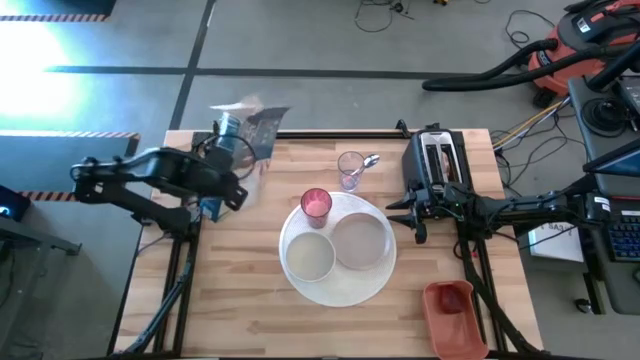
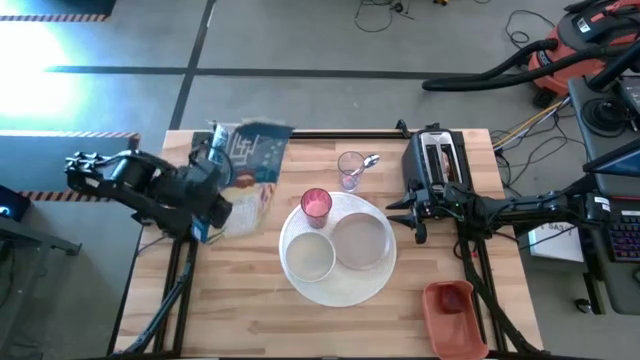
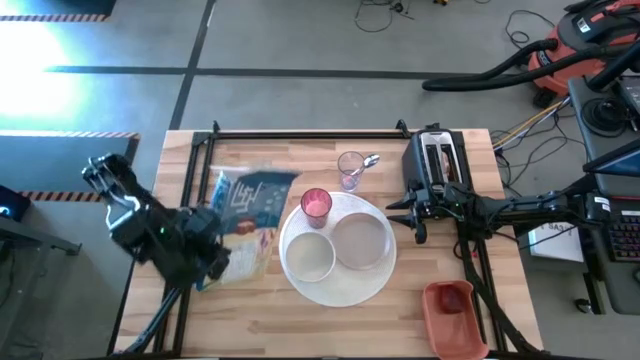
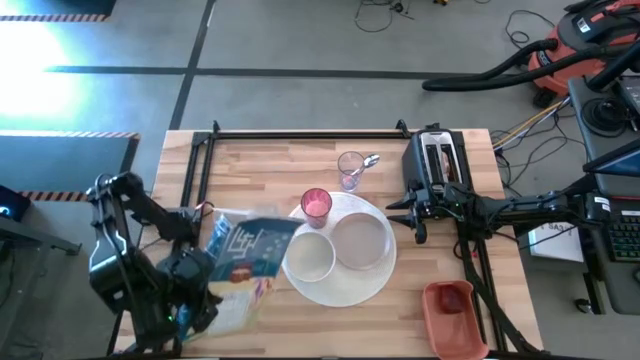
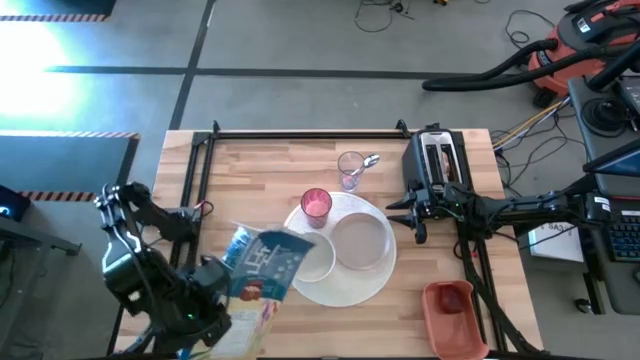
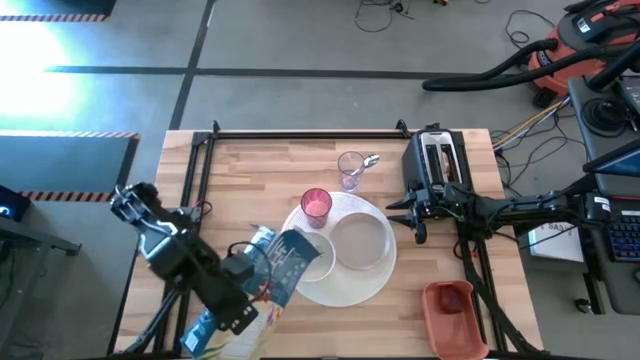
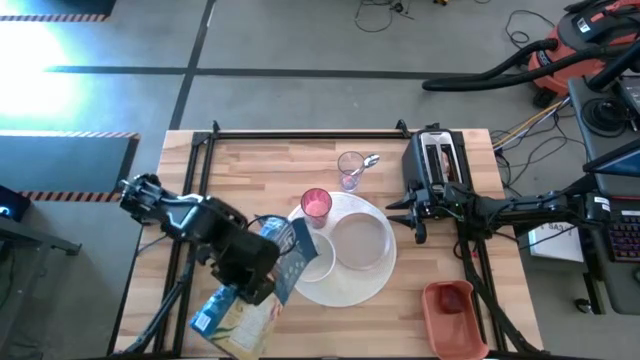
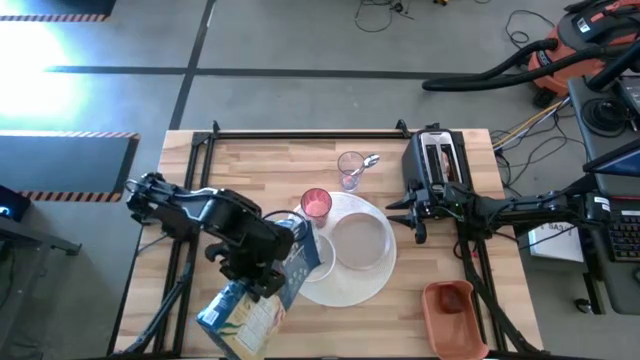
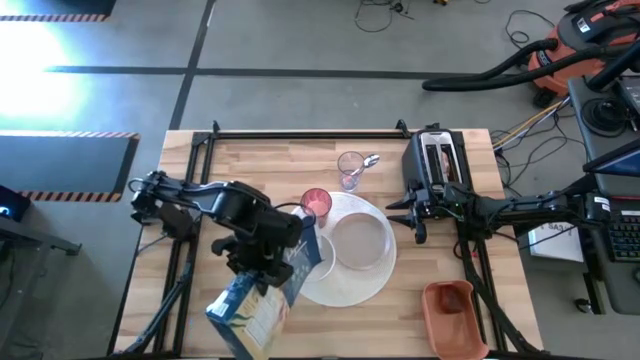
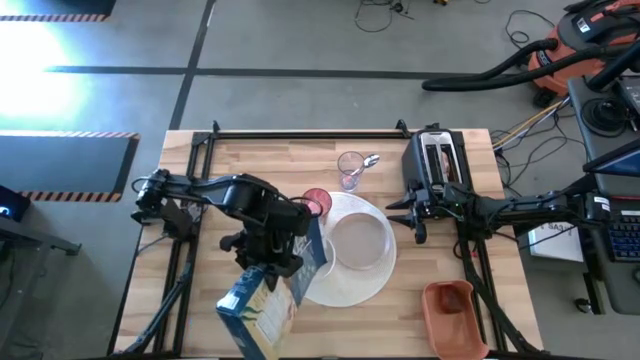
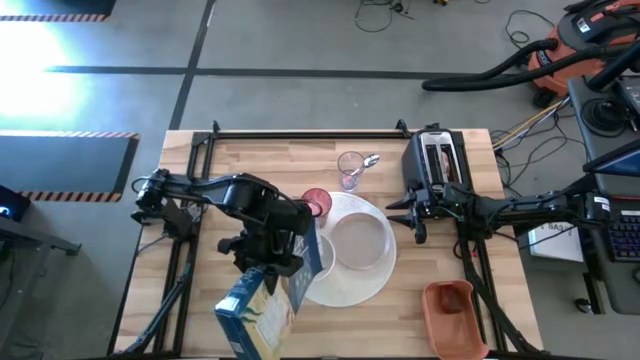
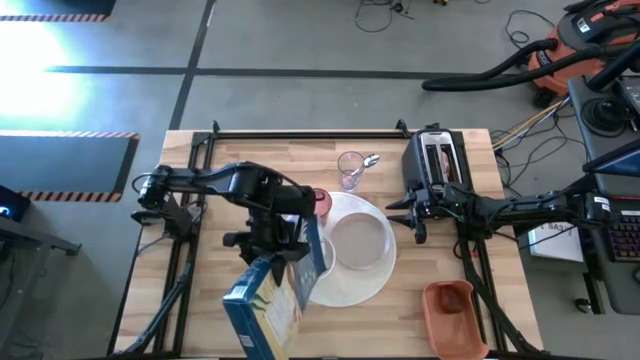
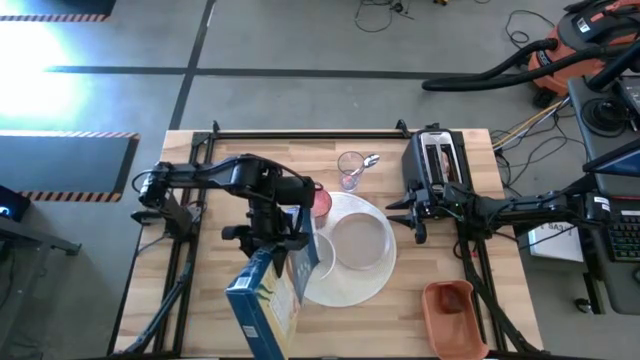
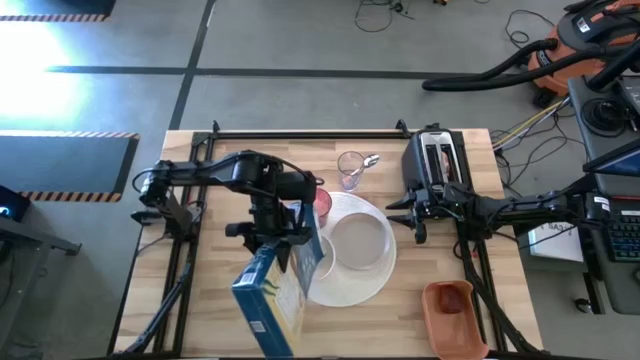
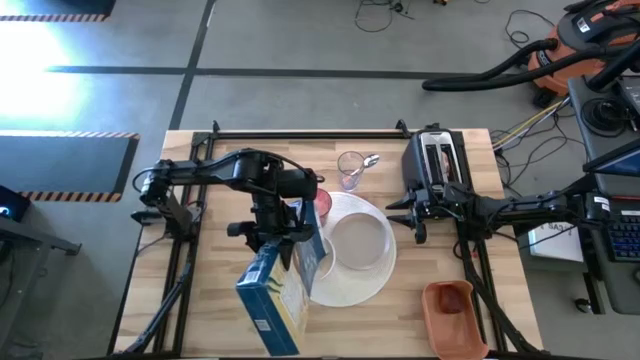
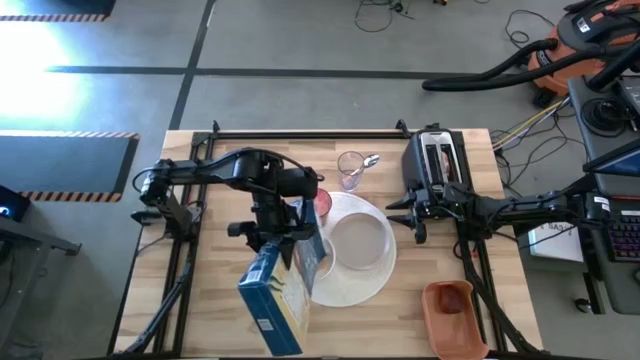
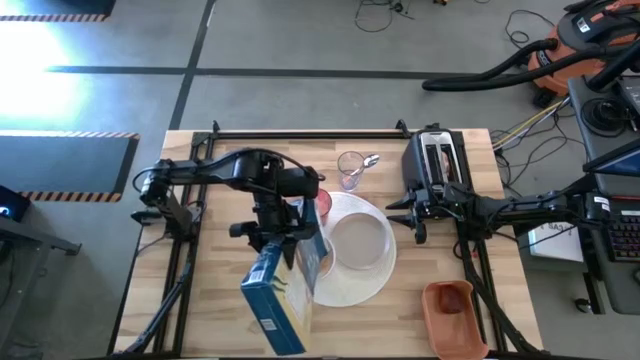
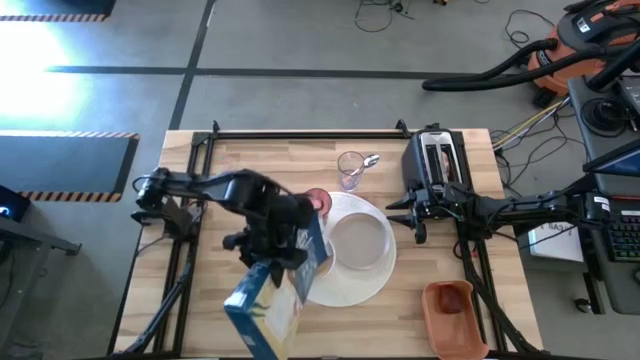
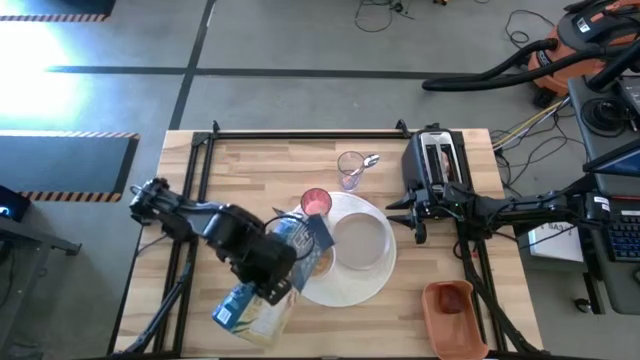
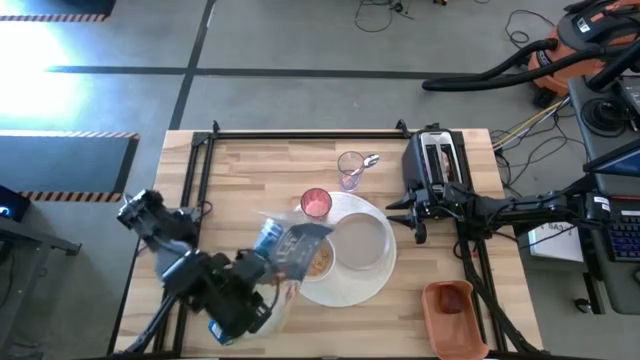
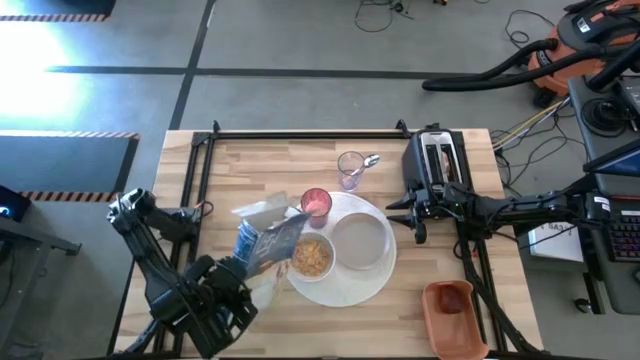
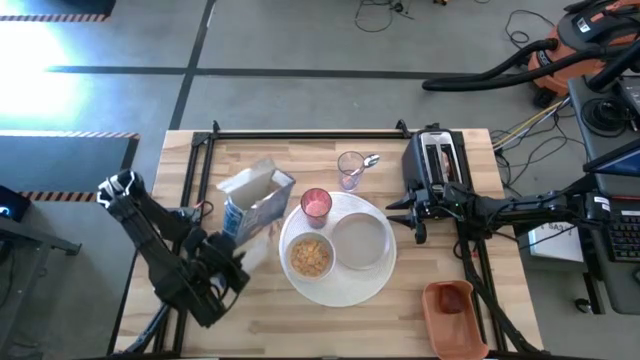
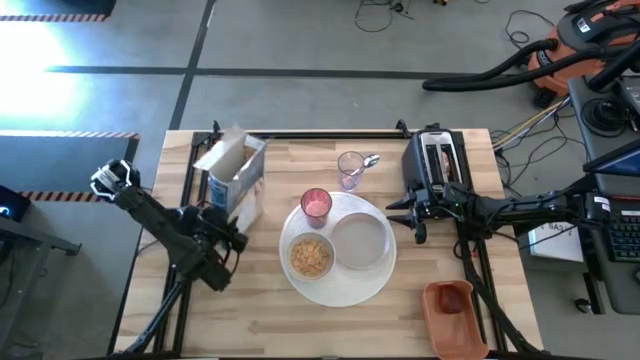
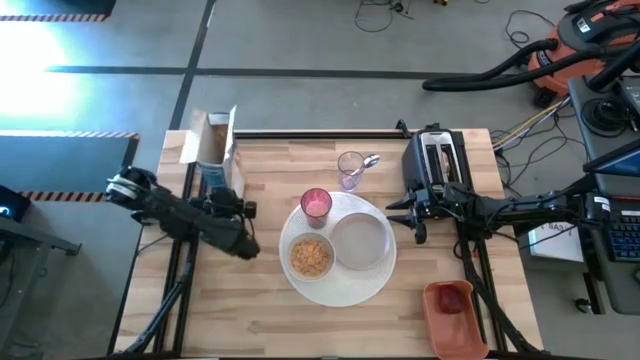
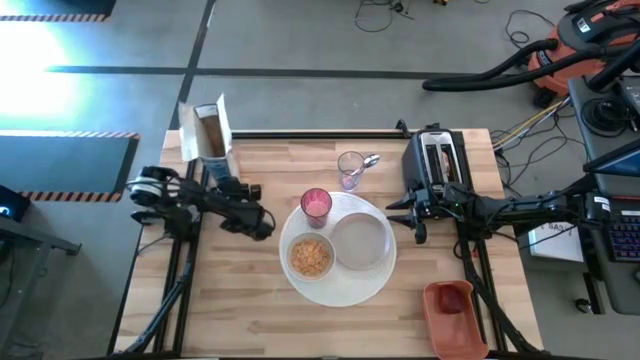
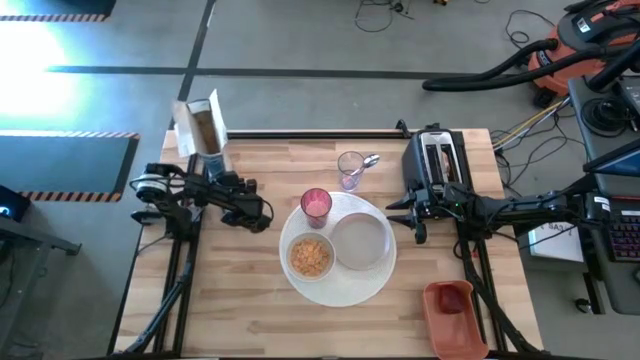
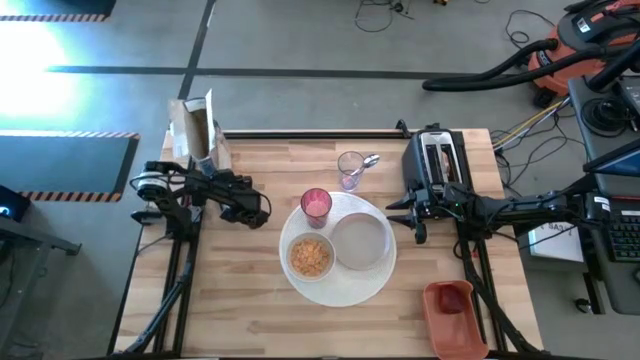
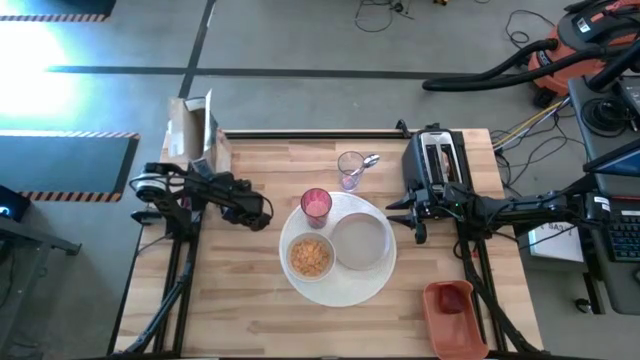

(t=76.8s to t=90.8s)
Task: Arrange a breakfast setting
Pour the cereal from the blue cereal box into the white bowl

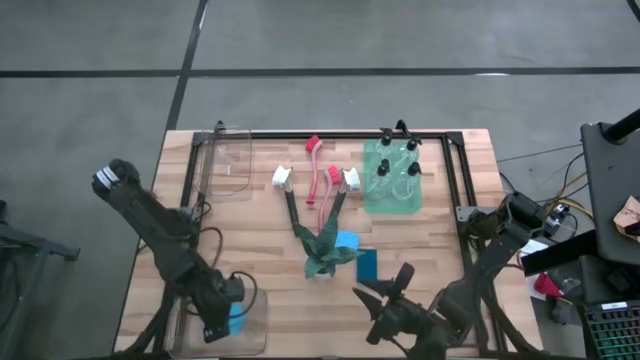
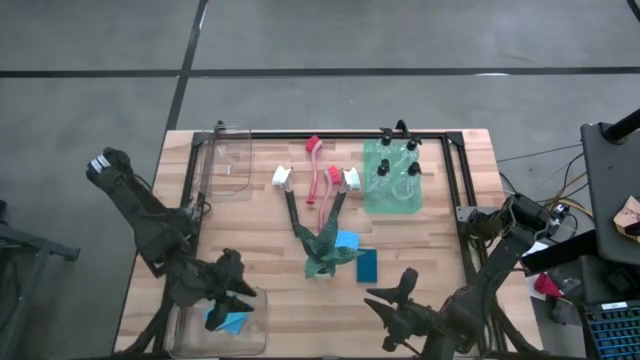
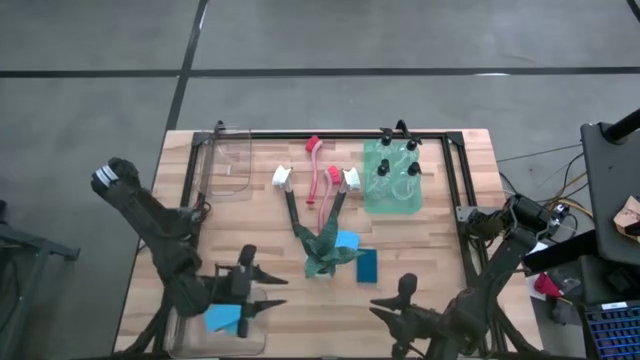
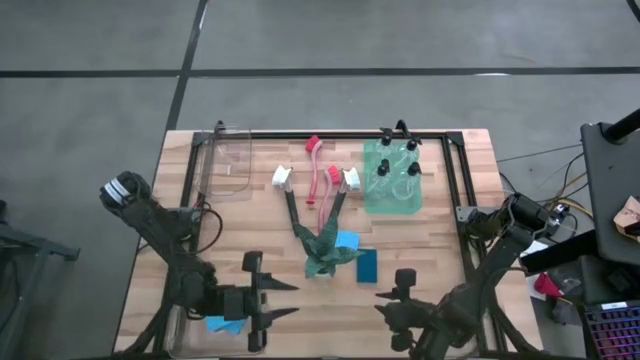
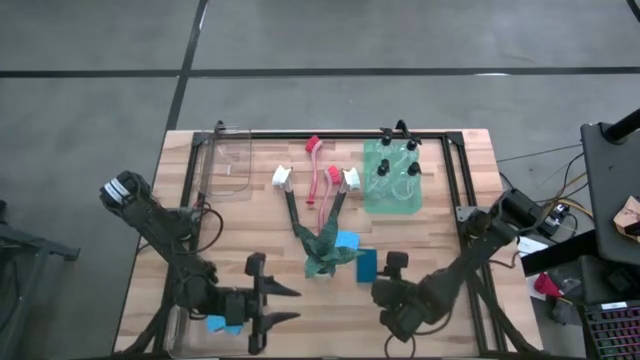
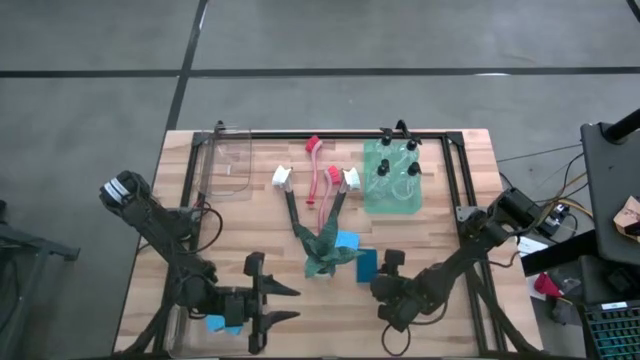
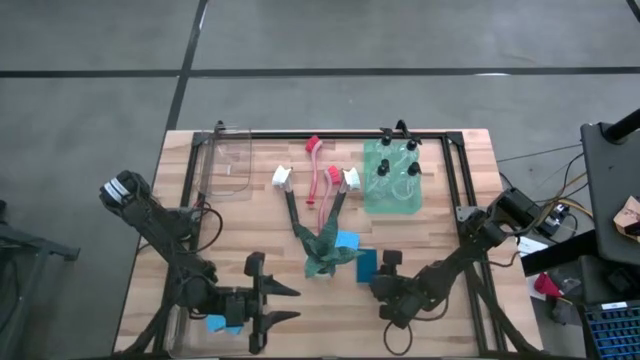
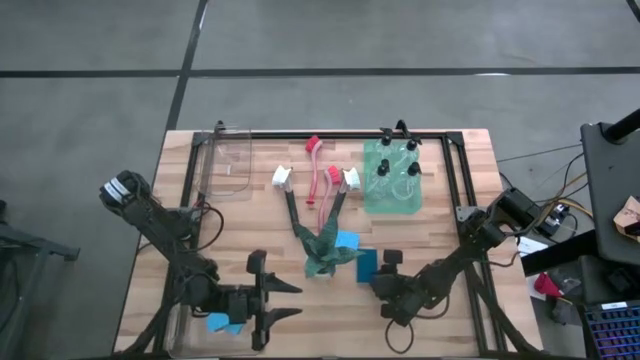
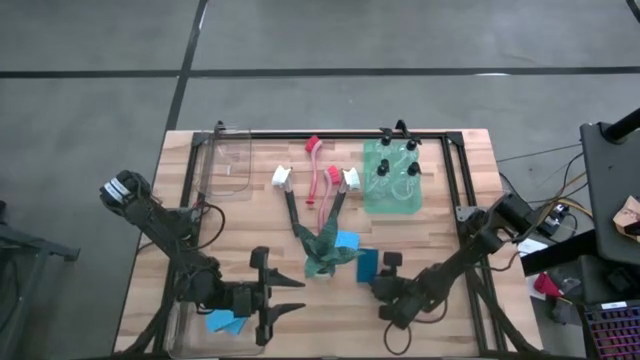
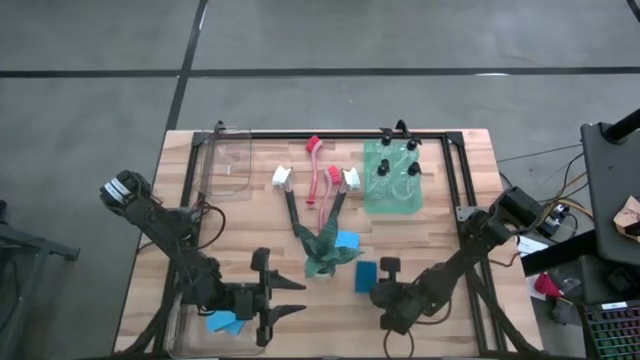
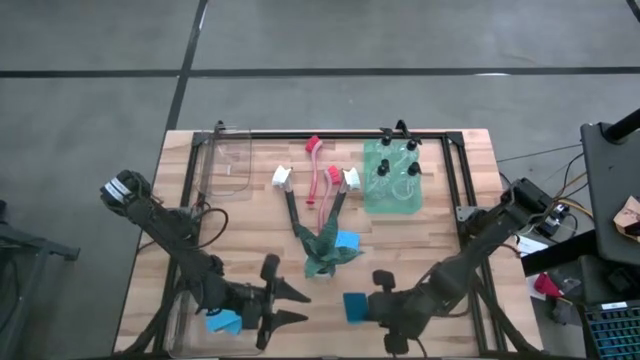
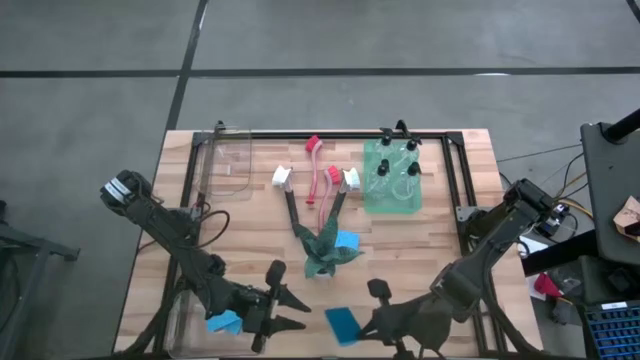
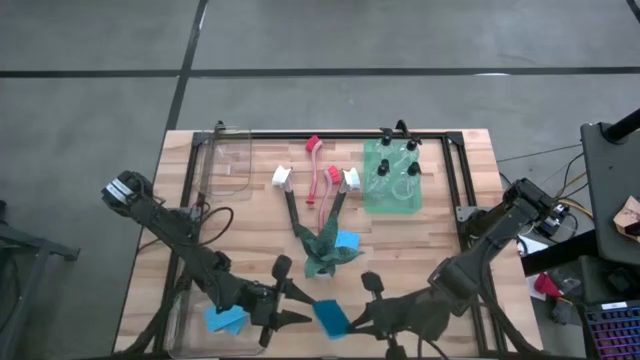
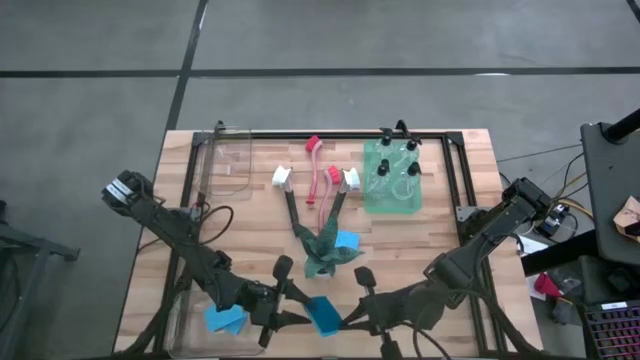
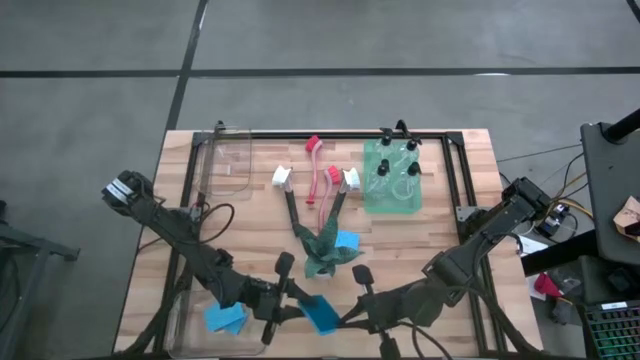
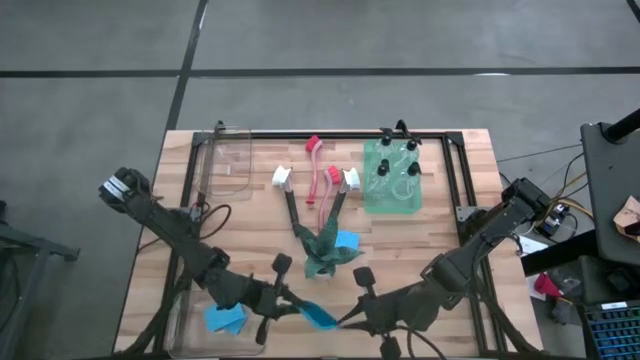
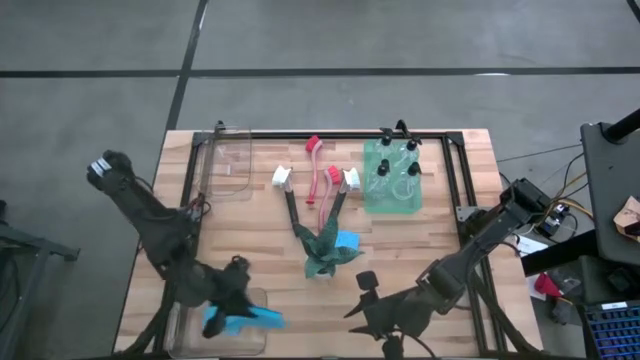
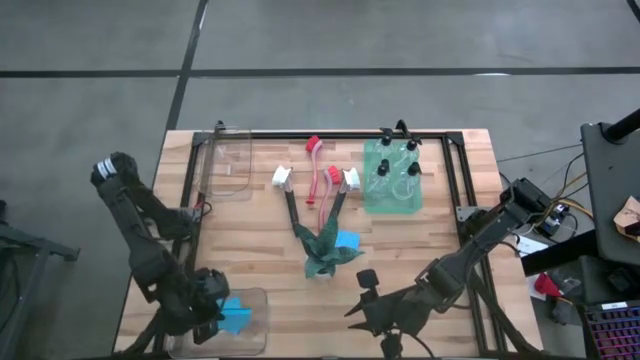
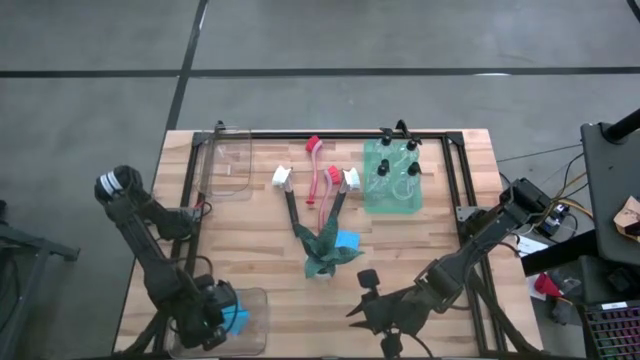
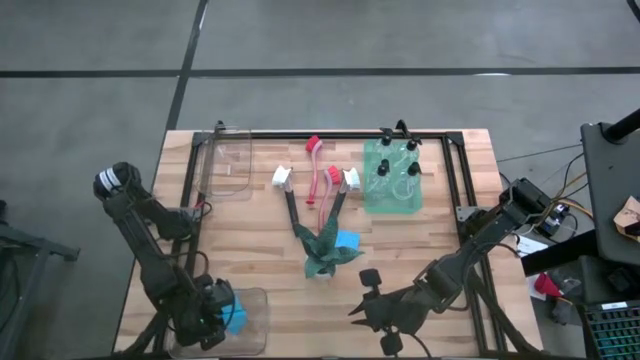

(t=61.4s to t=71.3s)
Task: Pick & Place Kitchen Sink Supplies
Put the blue sponge into the bottom transparent bin
